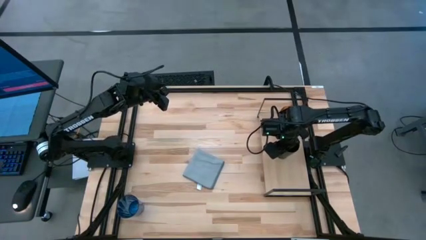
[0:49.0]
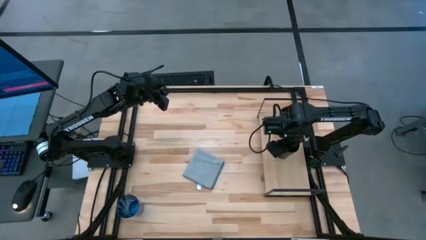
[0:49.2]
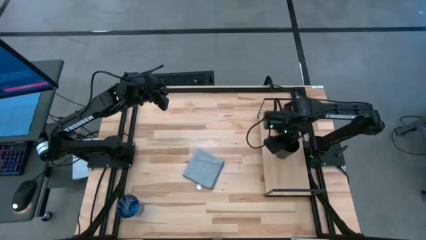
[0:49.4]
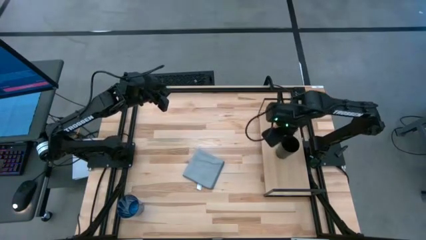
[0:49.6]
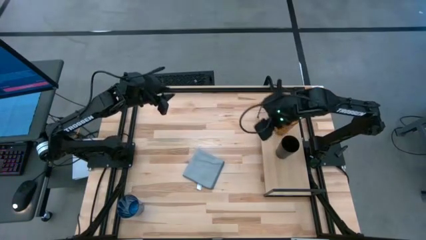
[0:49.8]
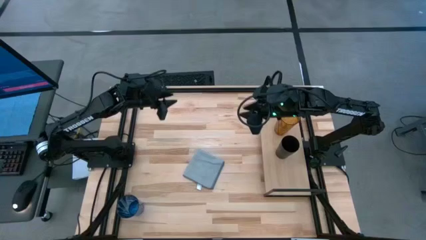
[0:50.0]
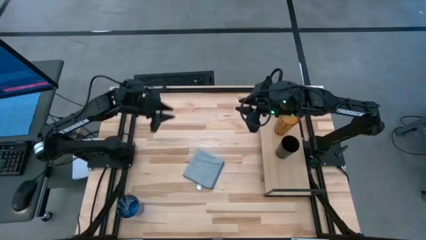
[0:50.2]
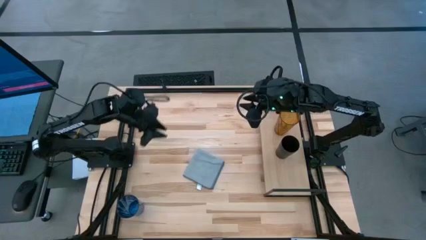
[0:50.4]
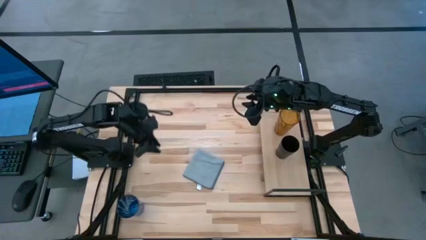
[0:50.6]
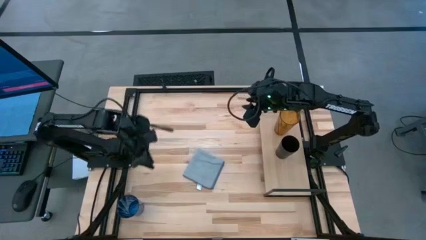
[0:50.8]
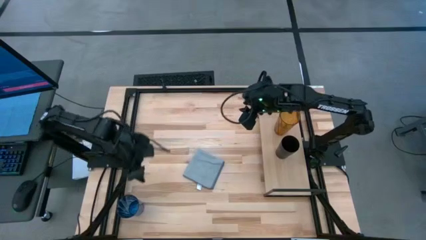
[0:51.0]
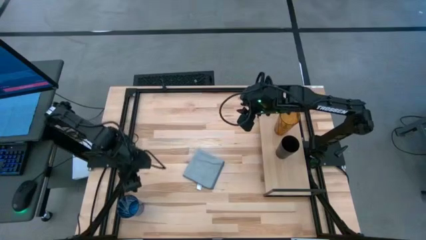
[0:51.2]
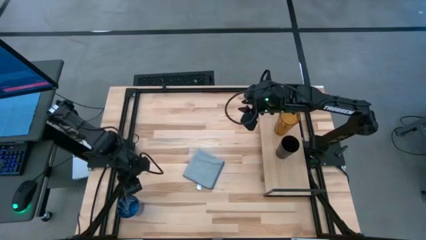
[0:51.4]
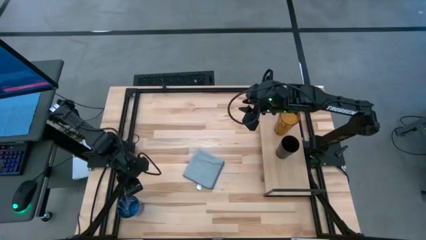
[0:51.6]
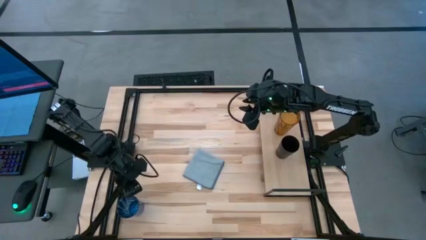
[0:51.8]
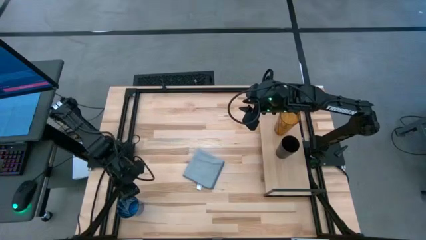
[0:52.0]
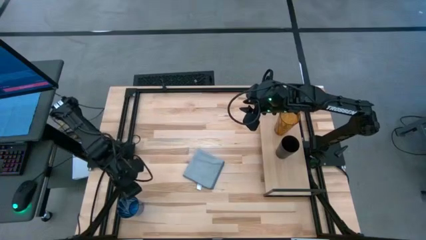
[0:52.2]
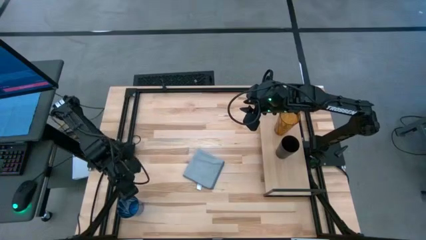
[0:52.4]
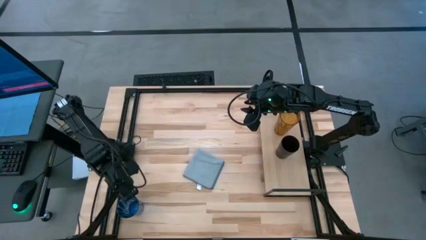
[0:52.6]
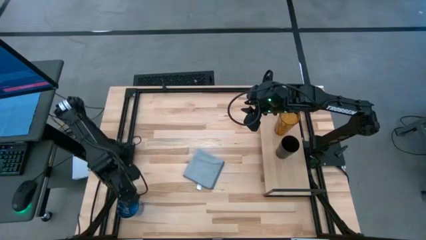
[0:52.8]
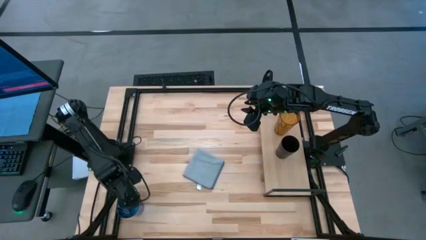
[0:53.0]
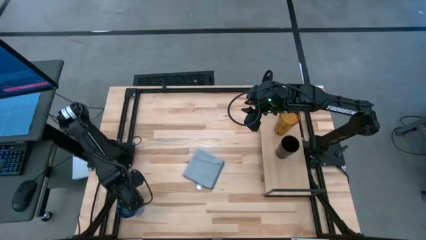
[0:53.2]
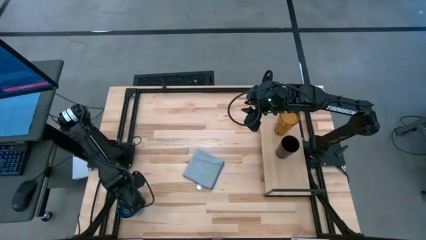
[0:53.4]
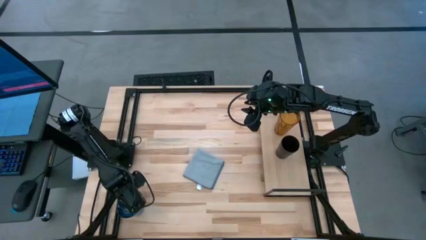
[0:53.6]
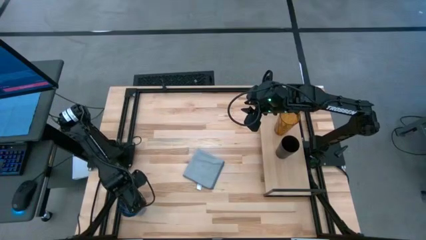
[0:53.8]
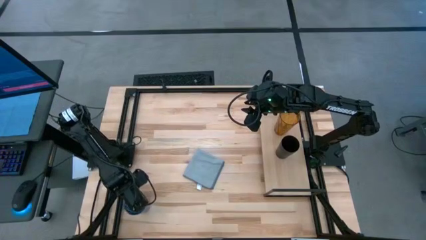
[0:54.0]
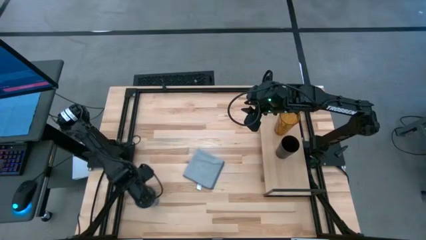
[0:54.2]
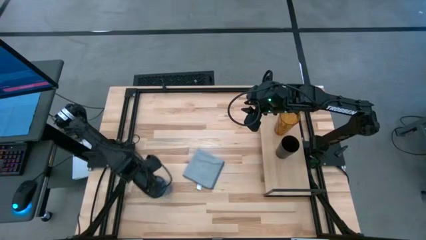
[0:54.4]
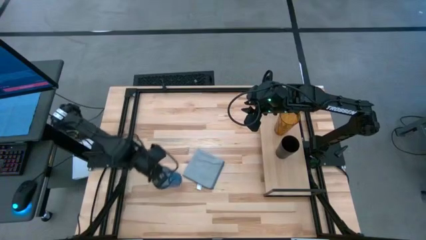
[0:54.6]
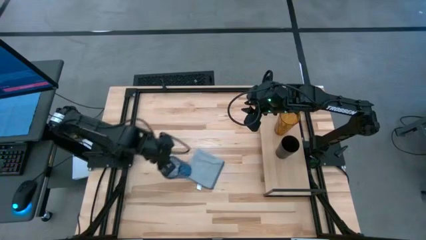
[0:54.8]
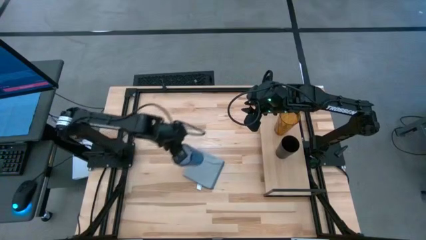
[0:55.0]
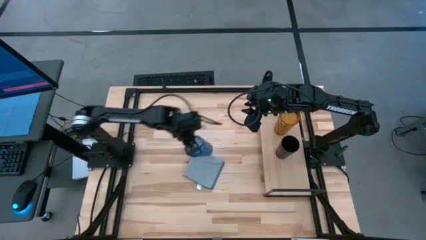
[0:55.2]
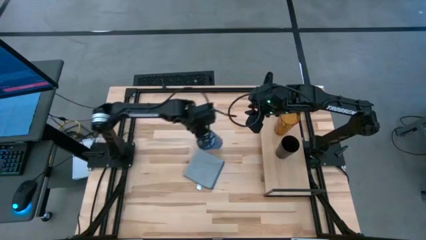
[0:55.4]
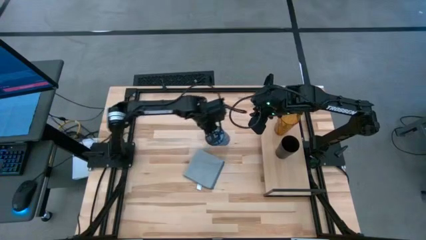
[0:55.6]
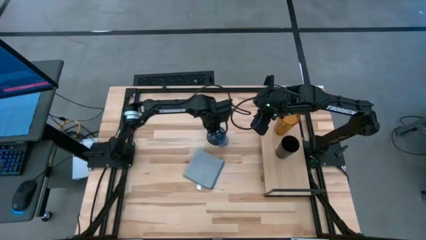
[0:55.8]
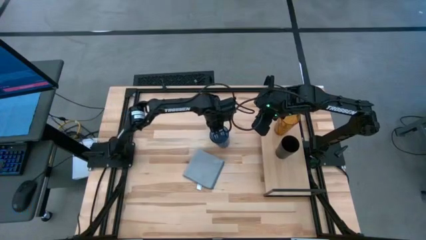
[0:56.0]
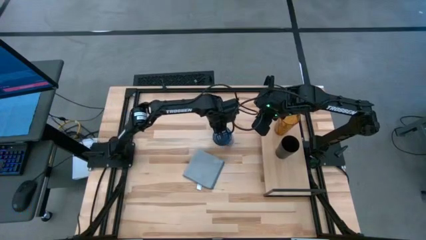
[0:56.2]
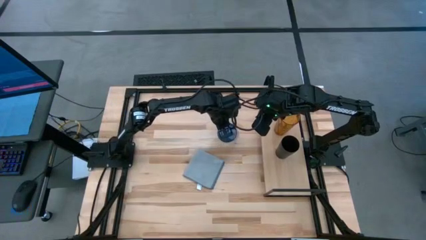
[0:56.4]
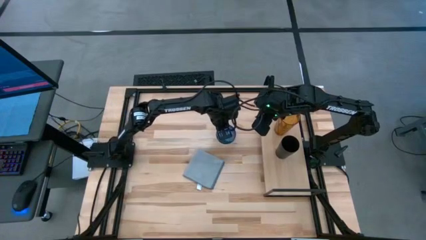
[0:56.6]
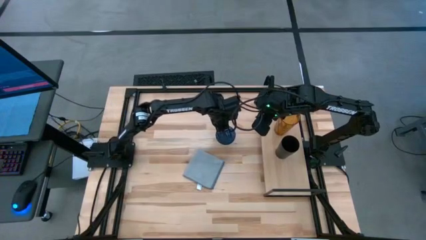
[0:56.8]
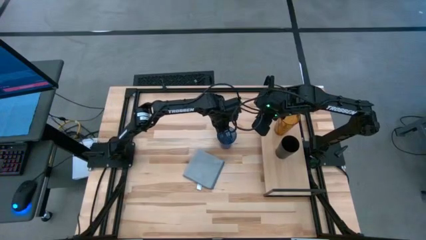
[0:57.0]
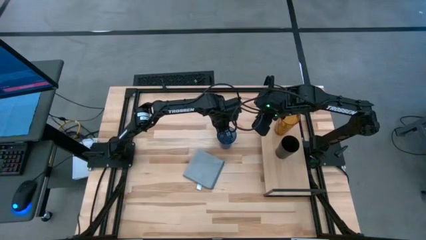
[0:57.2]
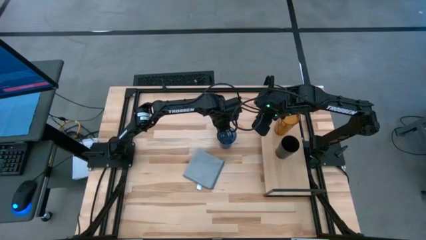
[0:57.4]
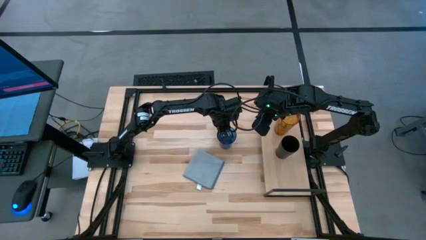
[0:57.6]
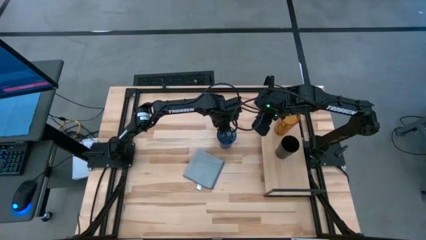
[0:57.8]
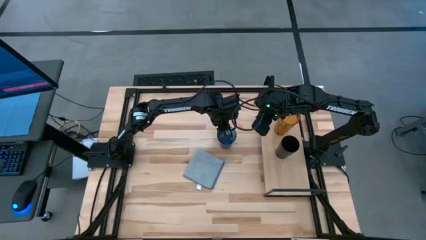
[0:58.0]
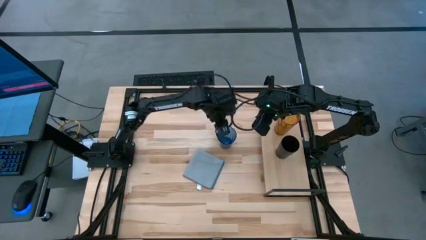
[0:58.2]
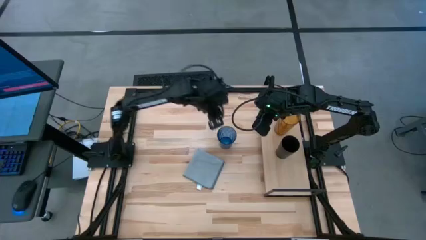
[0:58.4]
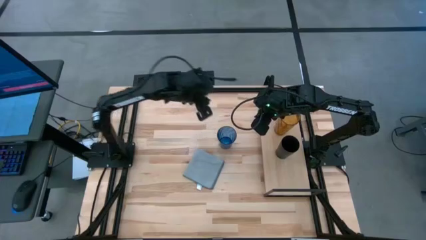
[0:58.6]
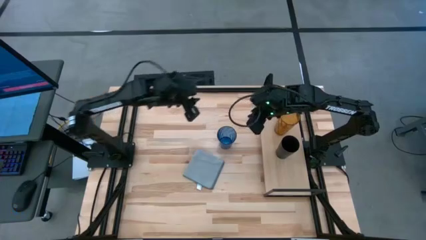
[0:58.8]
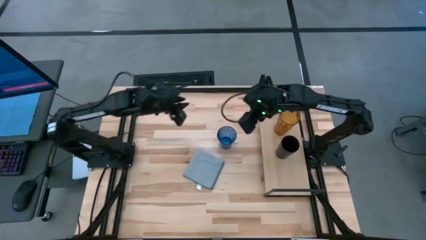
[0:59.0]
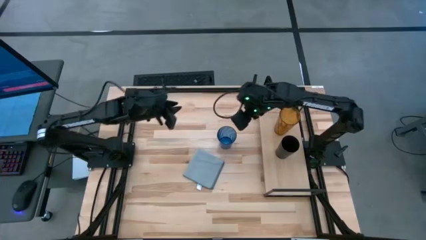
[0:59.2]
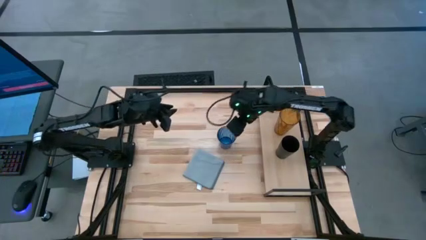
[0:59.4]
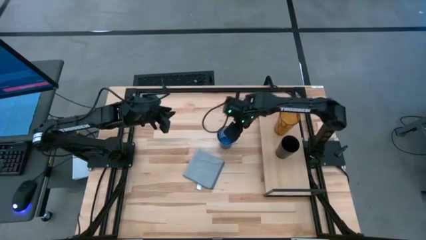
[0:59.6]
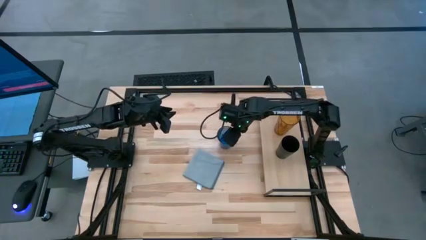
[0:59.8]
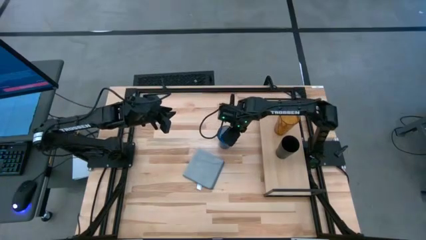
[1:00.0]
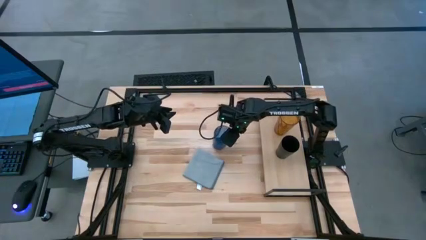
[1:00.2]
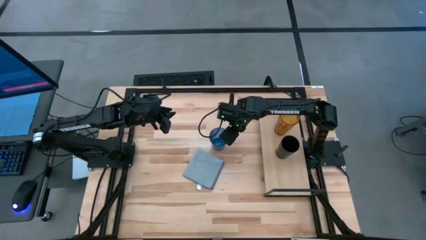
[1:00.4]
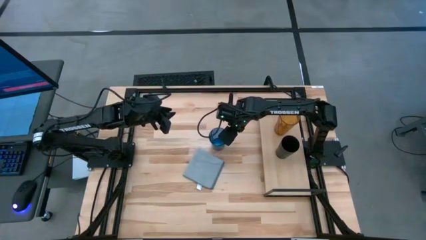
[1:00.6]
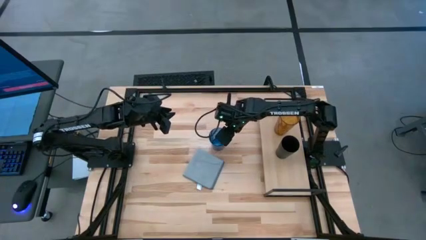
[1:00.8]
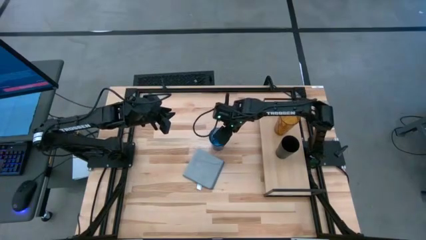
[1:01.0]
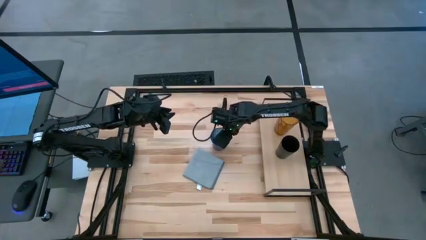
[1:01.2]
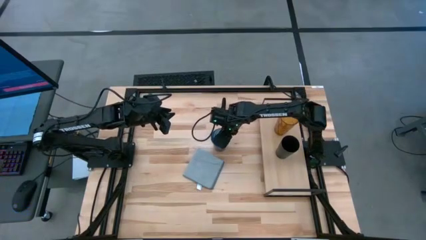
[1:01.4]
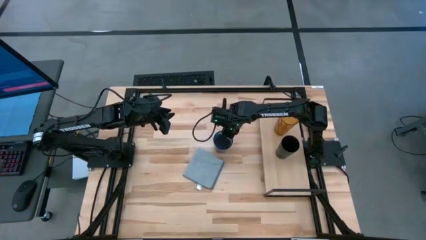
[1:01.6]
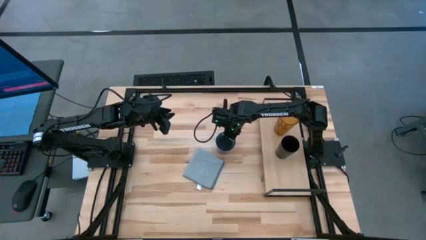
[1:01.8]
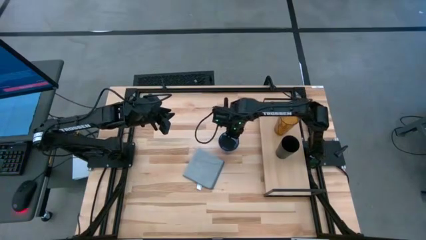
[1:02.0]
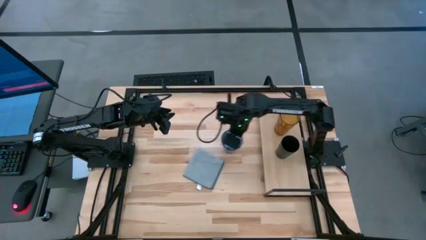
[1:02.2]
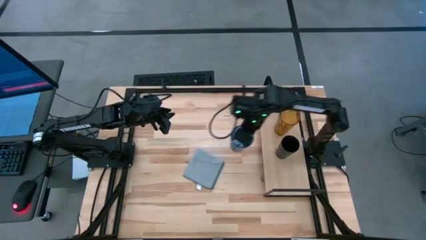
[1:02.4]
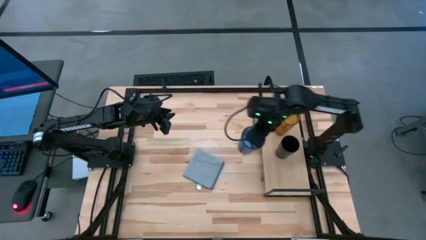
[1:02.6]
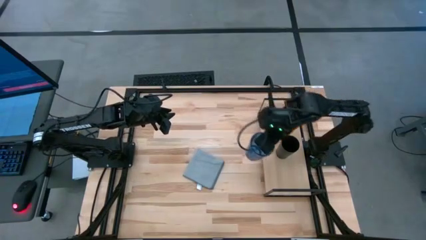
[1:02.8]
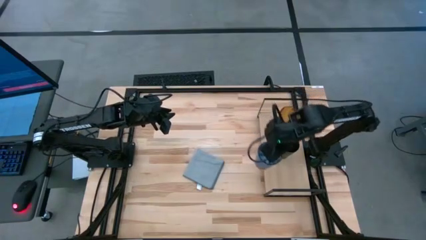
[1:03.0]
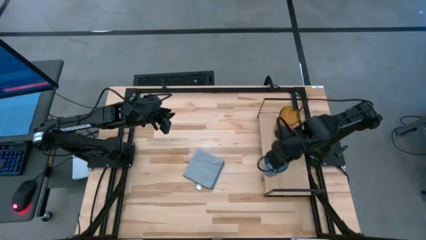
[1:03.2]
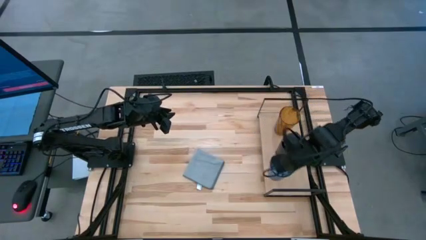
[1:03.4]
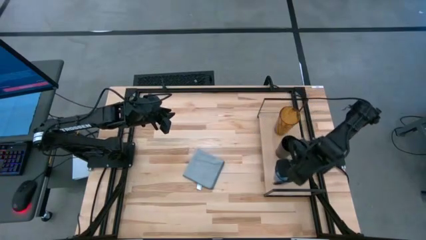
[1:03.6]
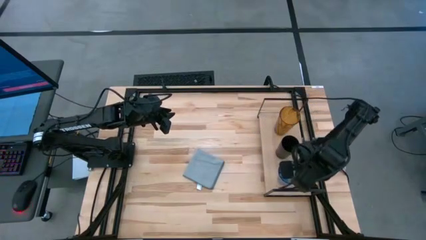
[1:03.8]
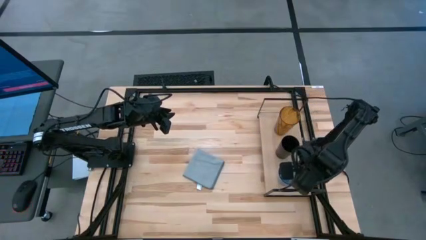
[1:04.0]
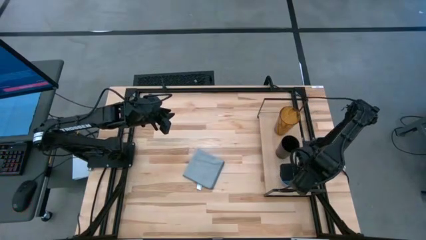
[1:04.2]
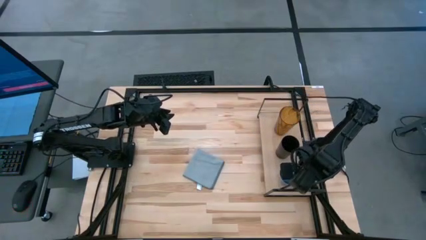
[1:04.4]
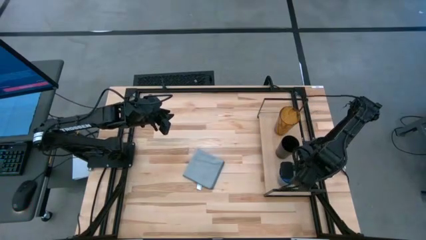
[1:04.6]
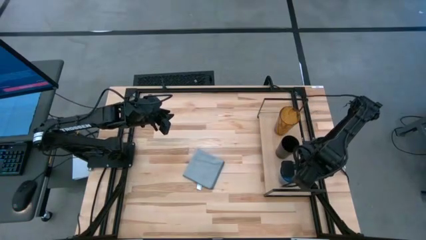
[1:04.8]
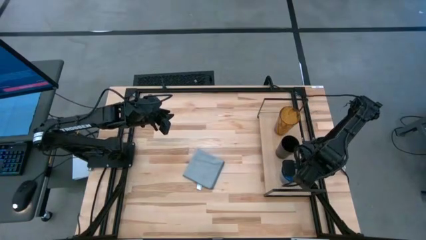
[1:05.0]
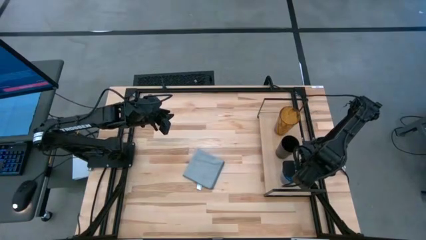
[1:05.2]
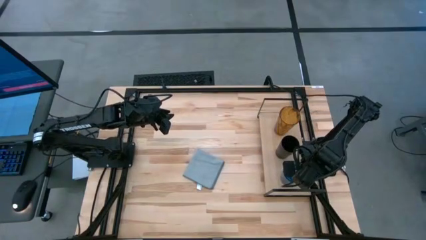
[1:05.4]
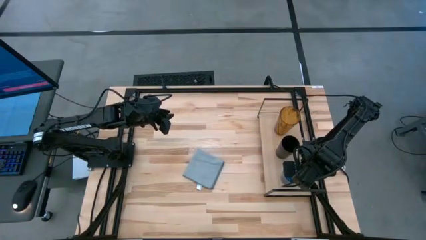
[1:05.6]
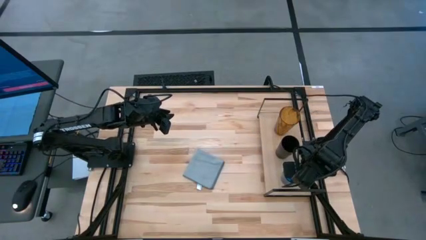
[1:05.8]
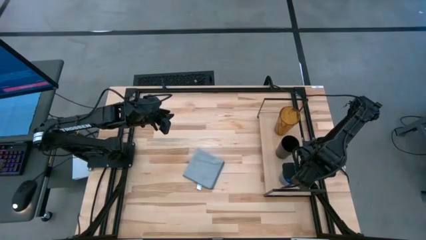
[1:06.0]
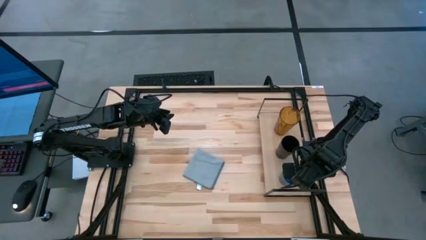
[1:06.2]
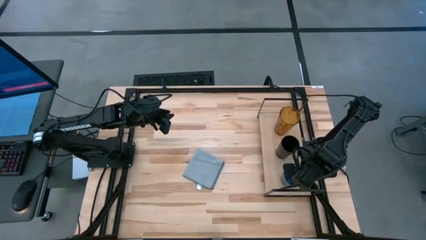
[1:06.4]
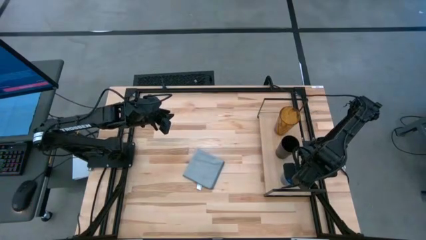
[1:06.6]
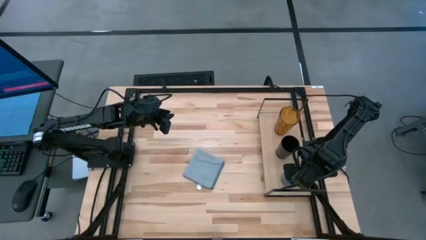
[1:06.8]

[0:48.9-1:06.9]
Task: Stack small to large cups/mugs on shelf
Put the blue cup on the shelf
